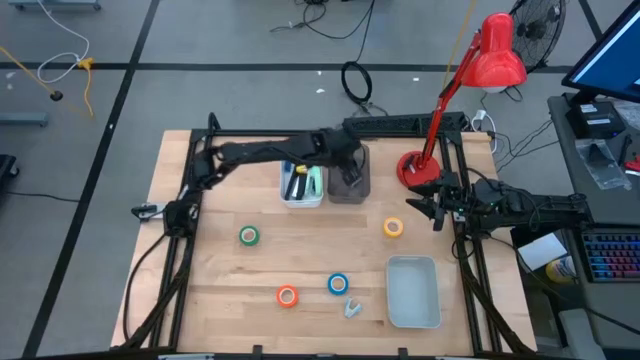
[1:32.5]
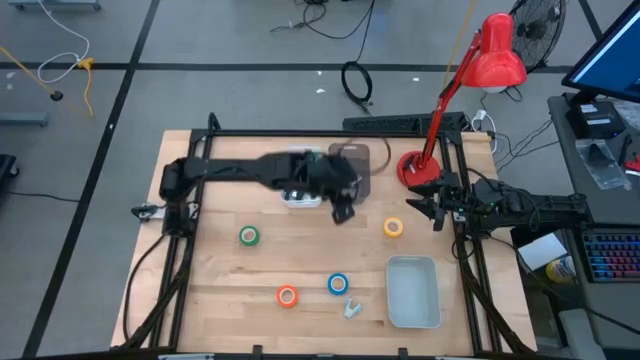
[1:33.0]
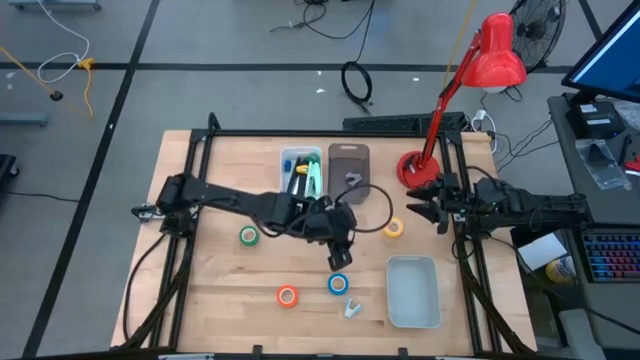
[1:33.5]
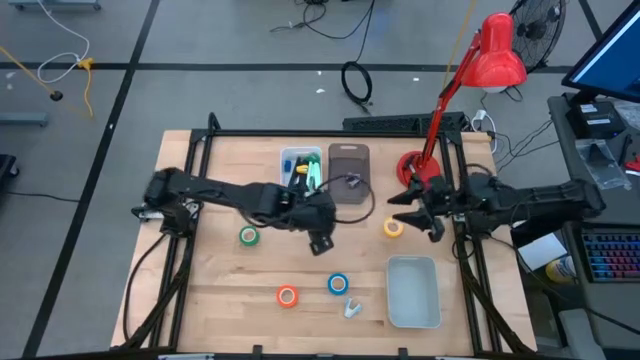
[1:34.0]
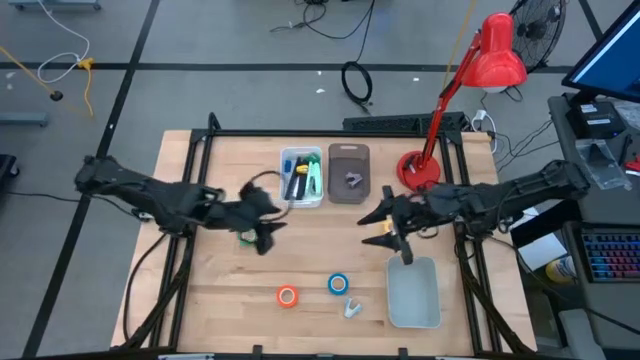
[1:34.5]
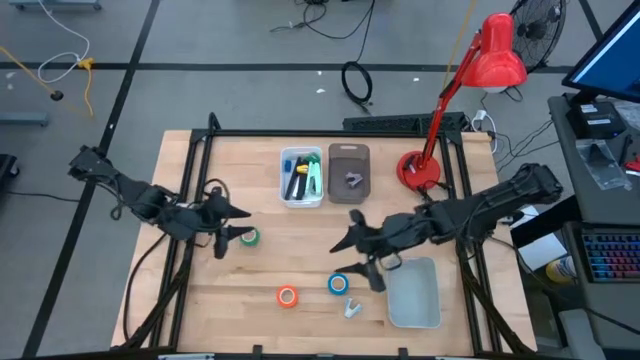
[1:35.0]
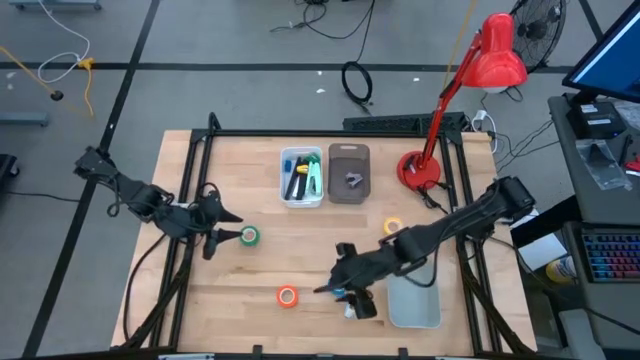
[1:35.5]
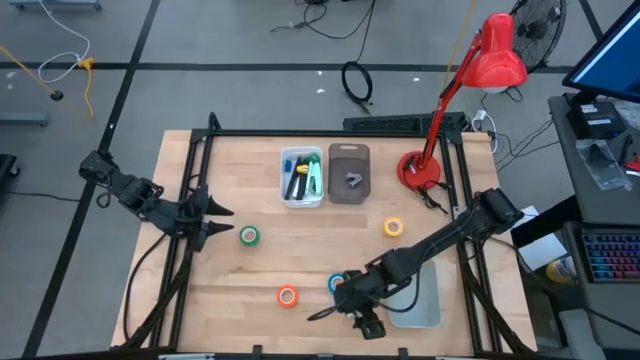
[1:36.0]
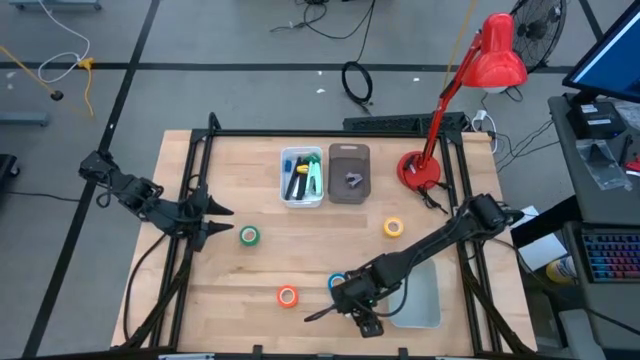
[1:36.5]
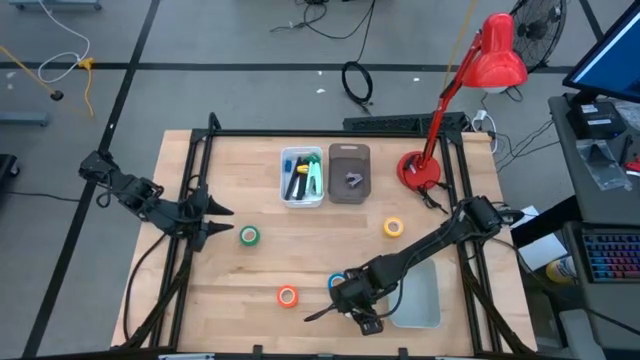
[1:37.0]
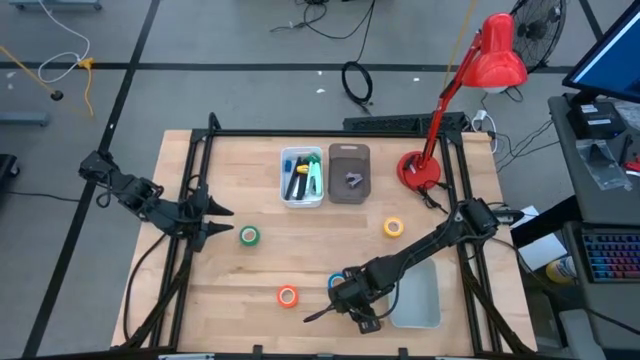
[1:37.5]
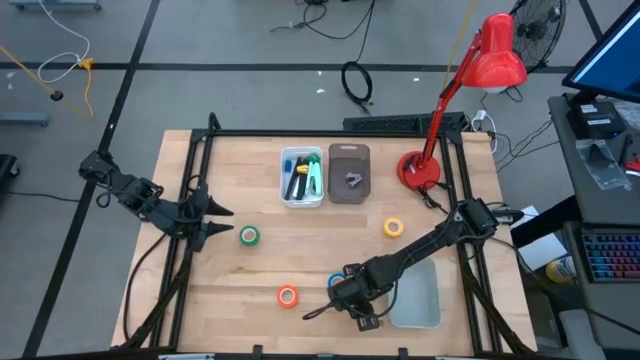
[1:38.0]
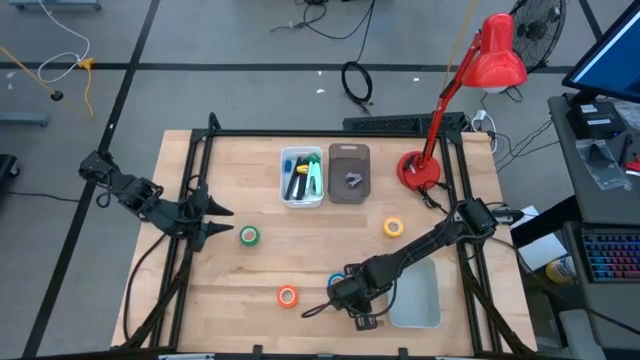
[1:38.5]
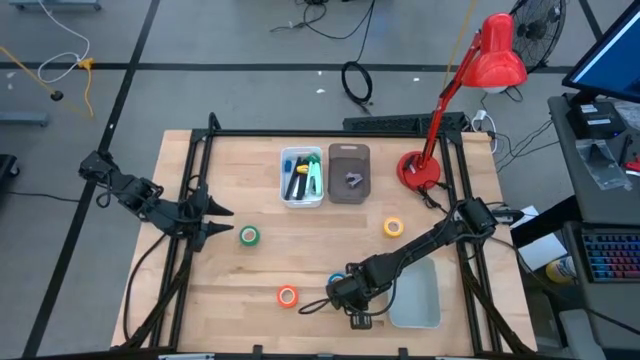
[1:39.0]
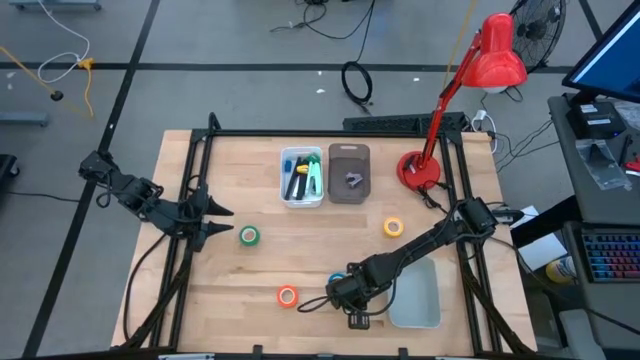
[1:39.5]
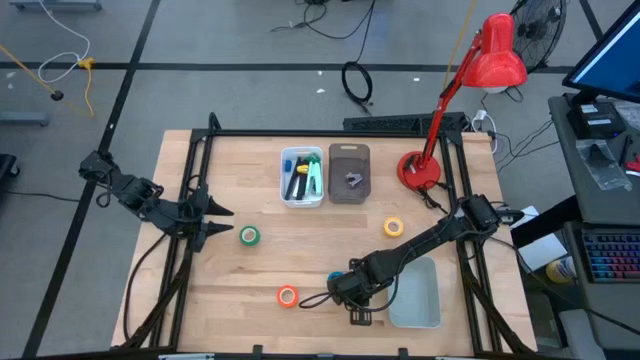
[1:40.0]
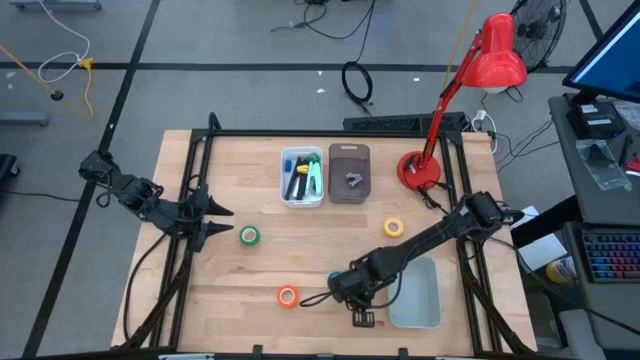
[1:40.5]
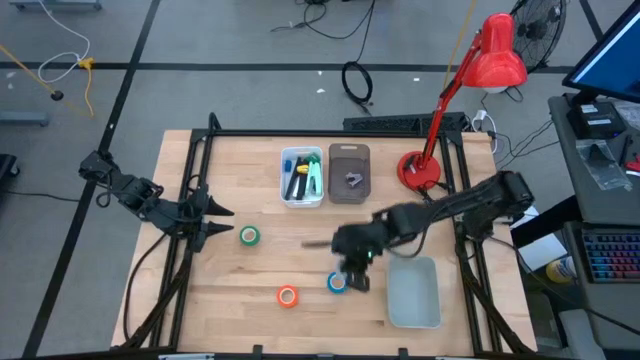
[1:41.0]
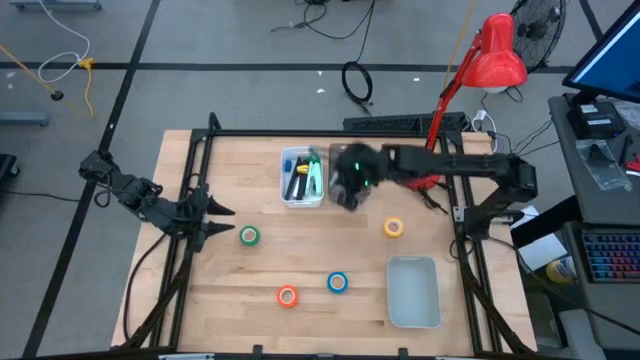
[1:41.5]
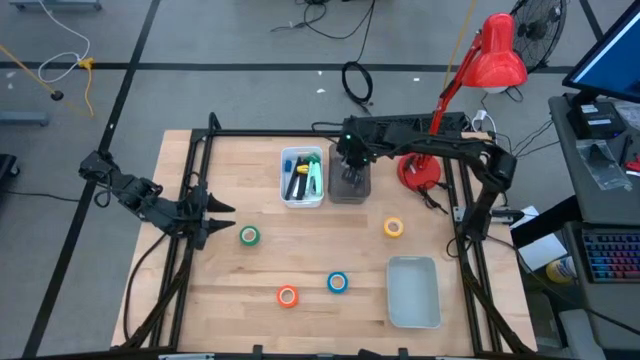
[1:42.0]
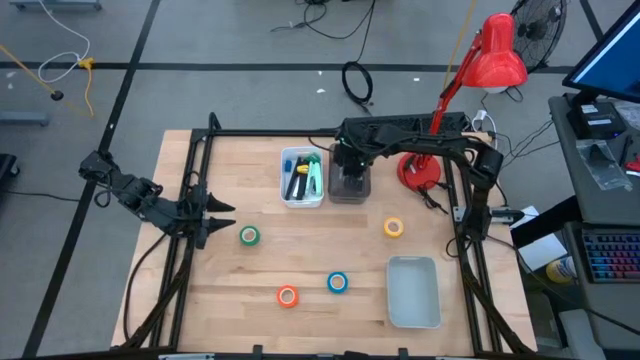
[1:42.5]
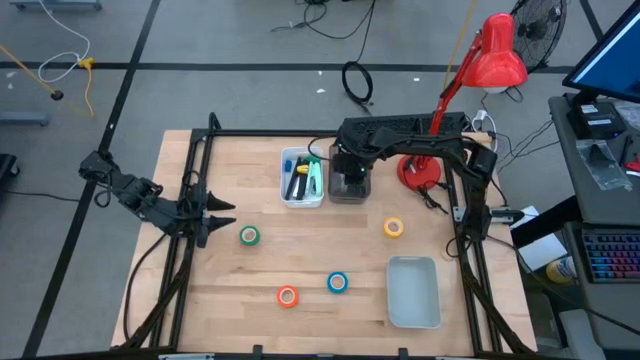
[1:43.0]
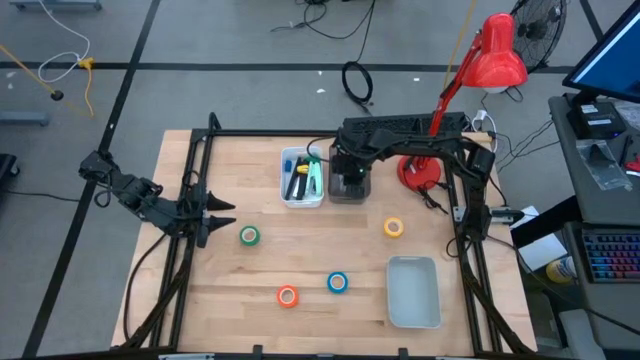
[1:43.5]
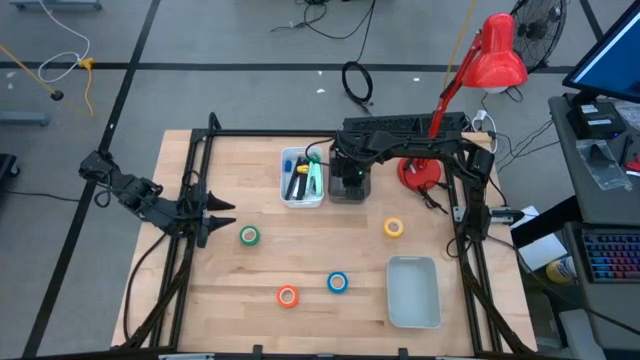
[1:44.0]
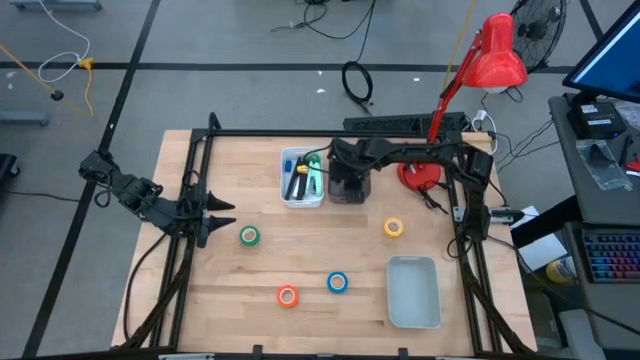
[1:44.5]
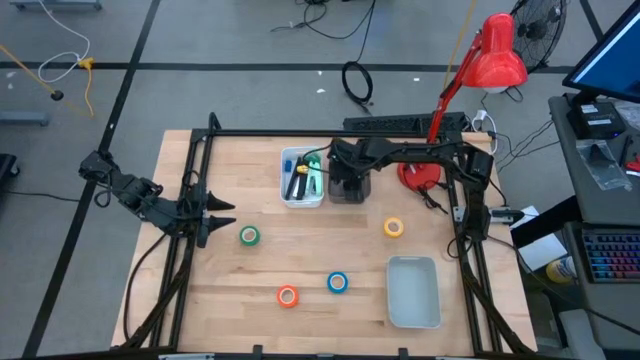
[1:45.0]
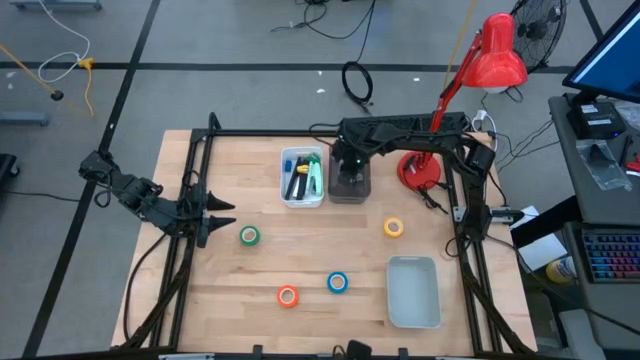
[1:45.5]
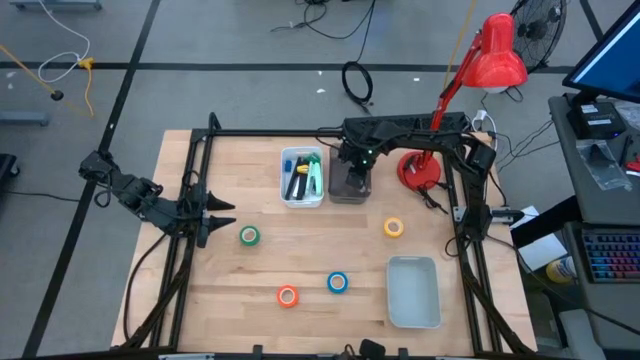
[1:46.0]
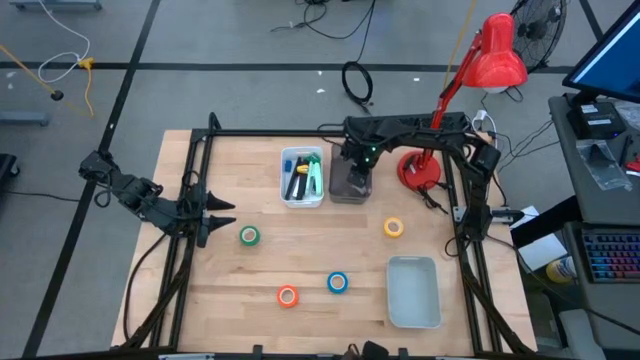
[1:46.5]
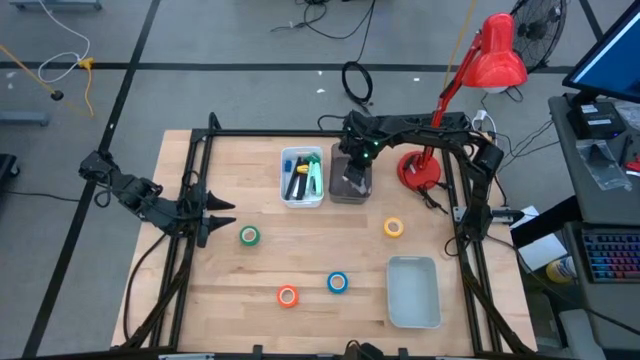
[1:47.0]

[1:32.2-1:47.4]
Task: Pick and place Stapler, Stapler remover, tape
Put the blue staple remover into the black bin

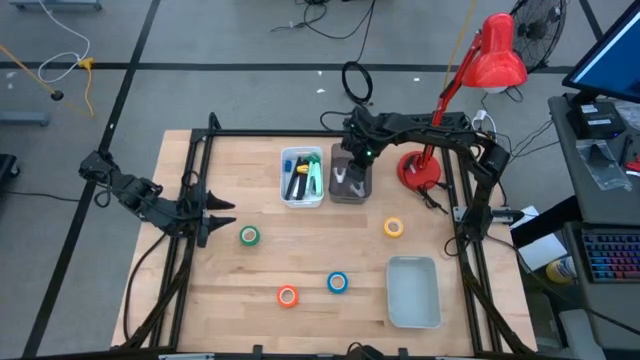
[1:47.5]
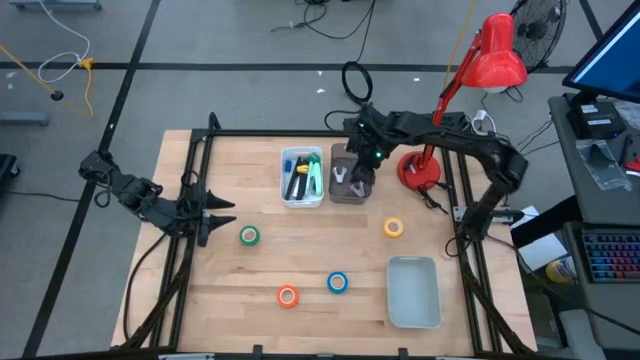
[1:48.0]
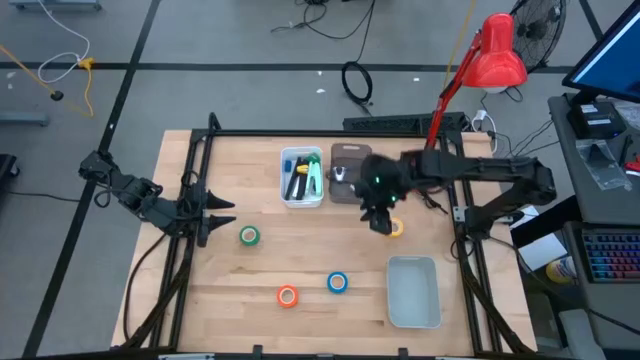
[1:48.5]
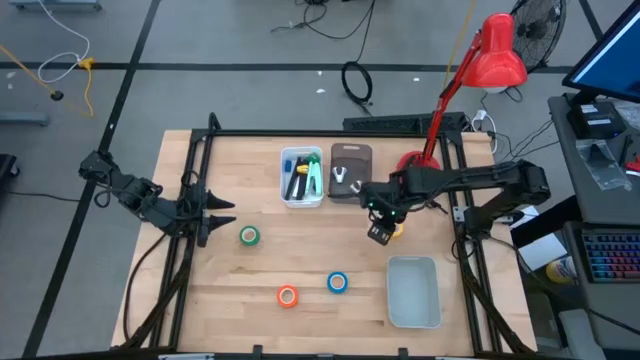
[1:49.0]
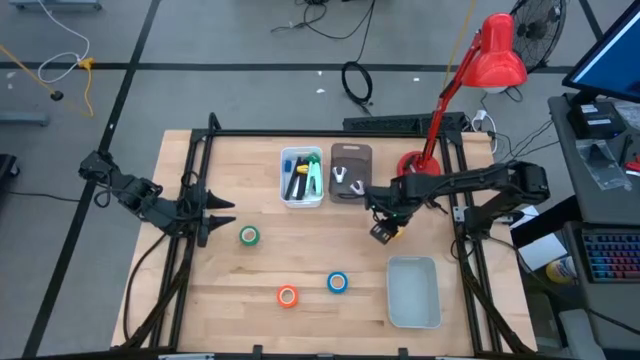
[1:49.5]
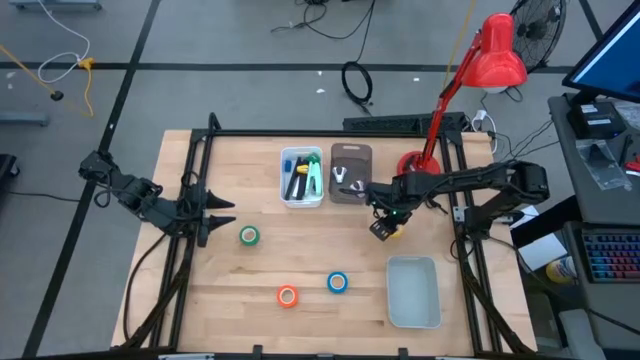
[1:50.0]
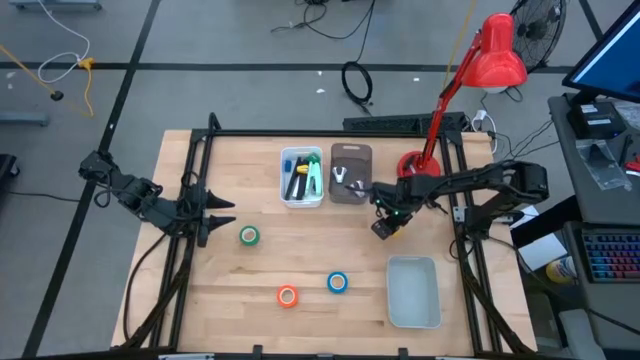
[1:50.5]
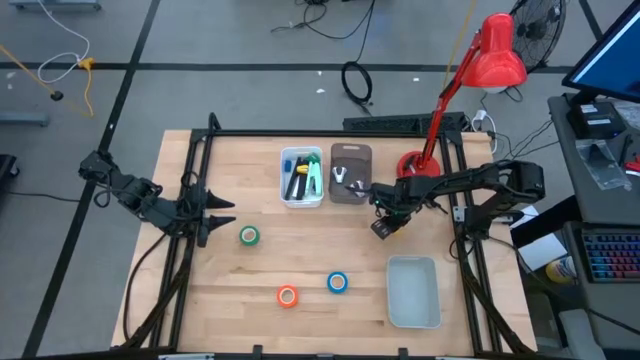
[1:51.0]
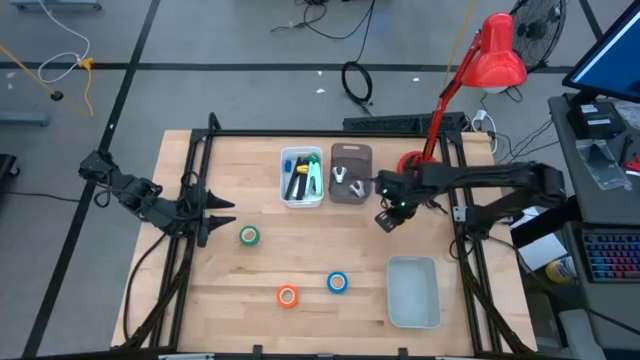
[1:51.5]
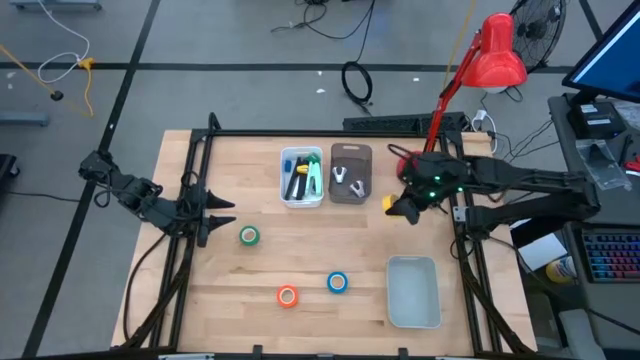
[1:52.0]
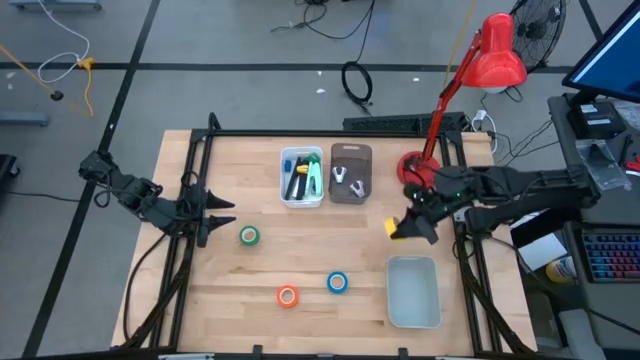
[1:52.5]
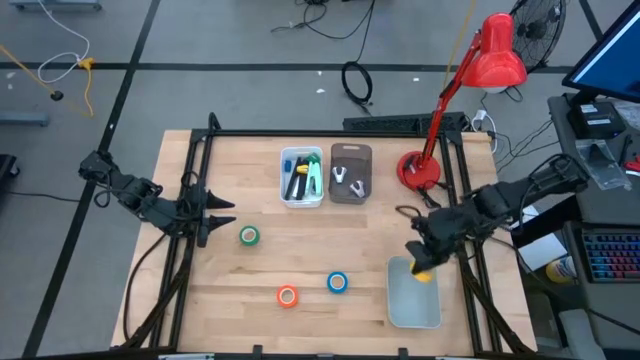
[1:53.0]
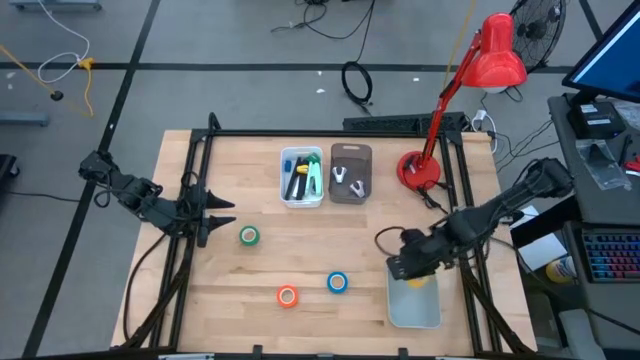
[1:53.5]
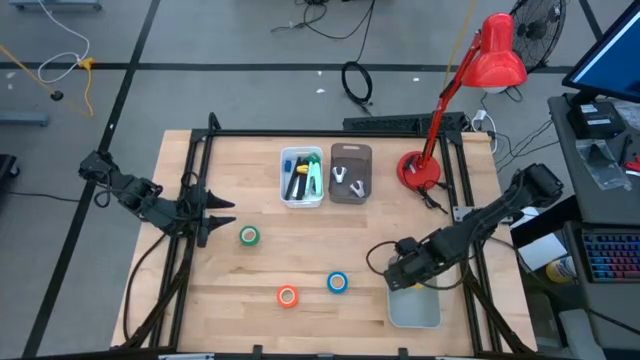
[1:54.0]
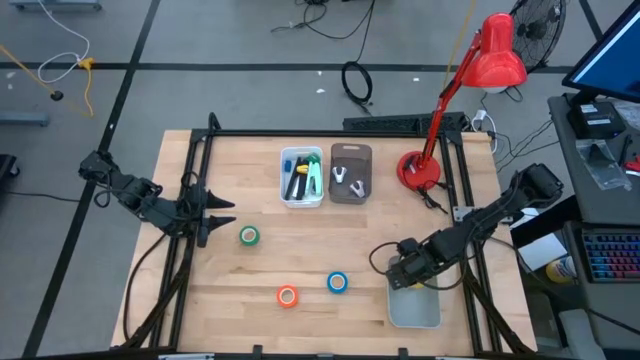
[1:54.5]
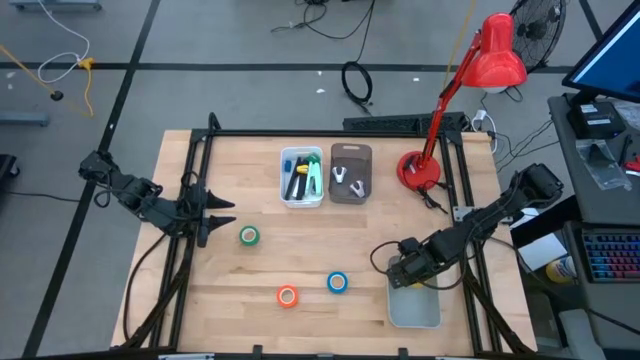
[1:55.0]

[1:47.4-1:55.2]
Put the yellow tape into the gray bin
